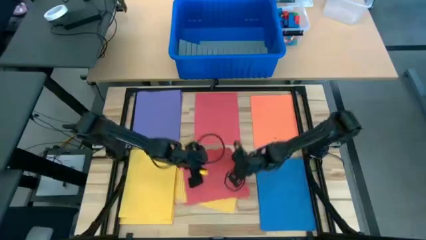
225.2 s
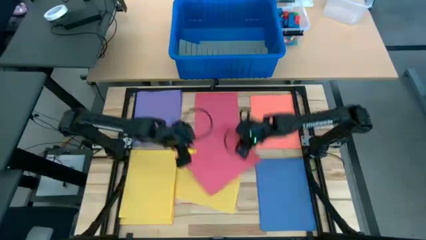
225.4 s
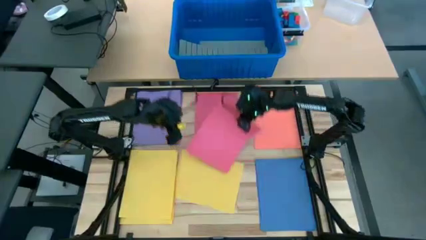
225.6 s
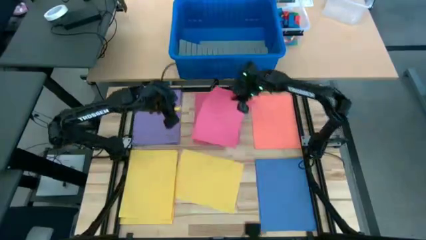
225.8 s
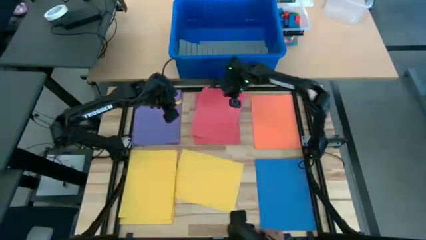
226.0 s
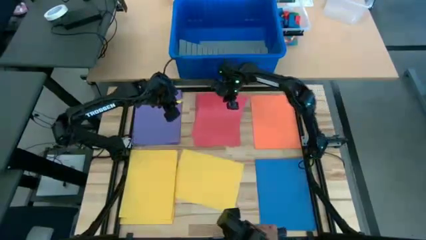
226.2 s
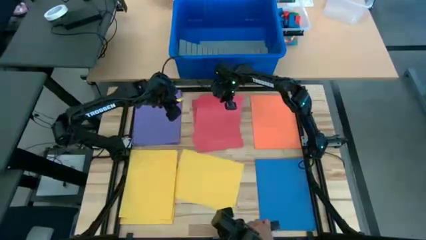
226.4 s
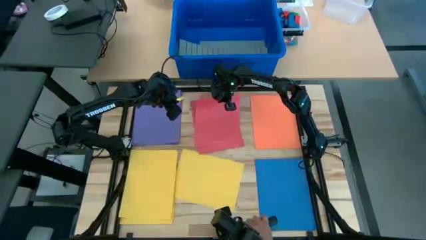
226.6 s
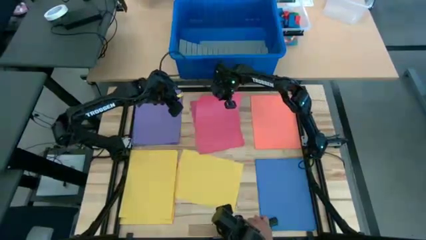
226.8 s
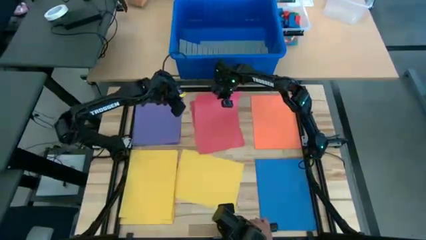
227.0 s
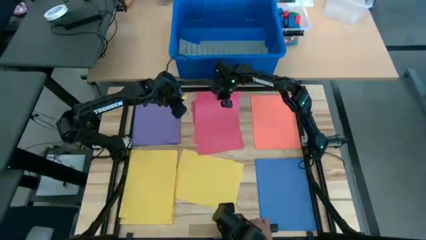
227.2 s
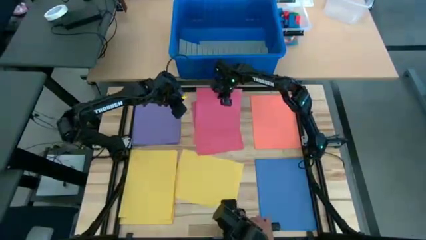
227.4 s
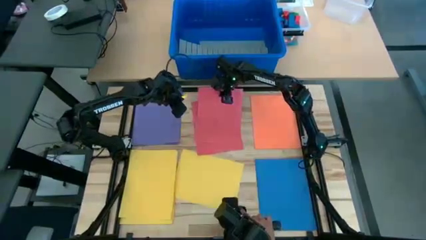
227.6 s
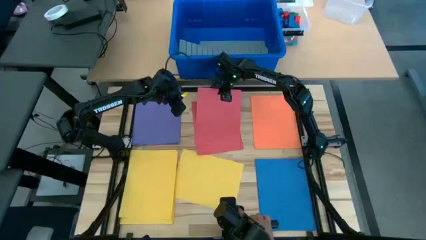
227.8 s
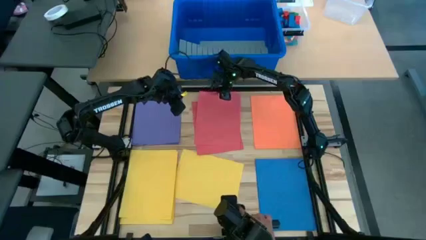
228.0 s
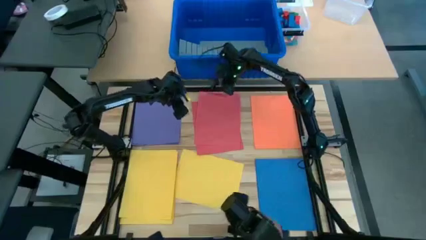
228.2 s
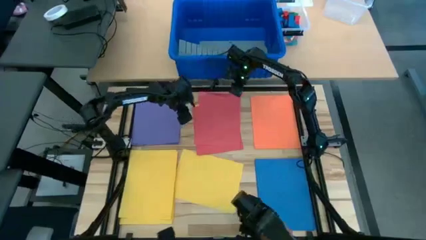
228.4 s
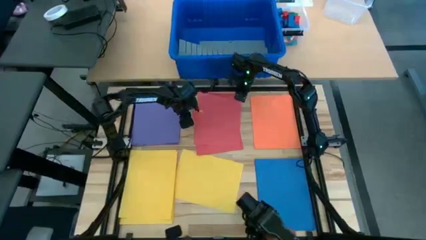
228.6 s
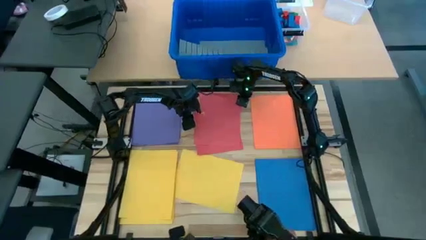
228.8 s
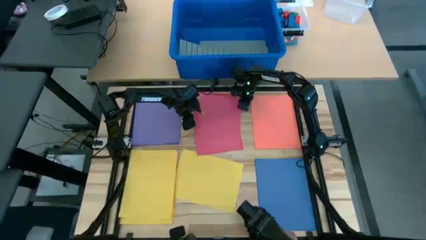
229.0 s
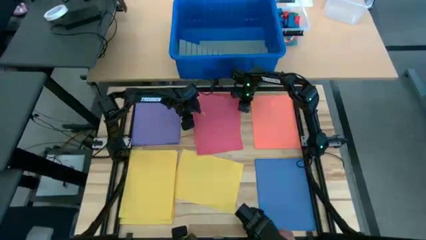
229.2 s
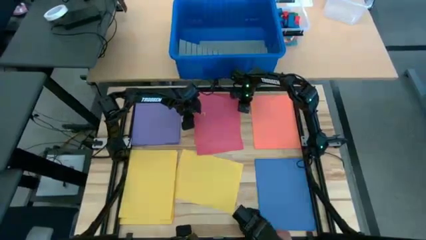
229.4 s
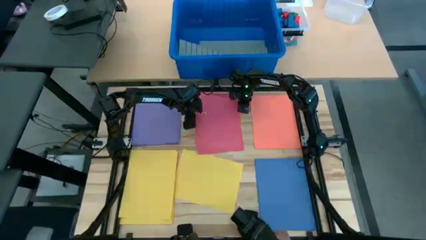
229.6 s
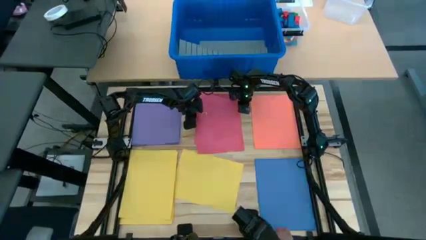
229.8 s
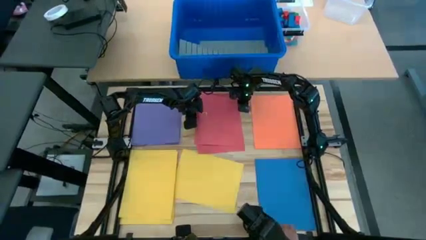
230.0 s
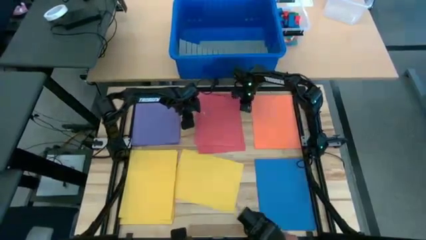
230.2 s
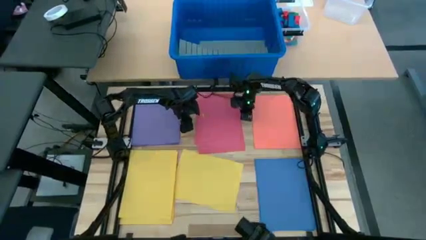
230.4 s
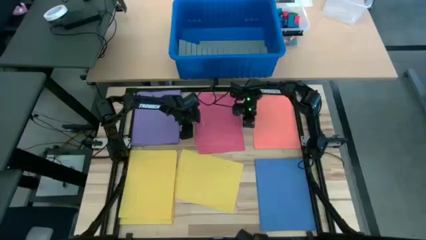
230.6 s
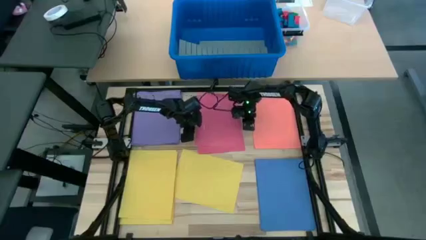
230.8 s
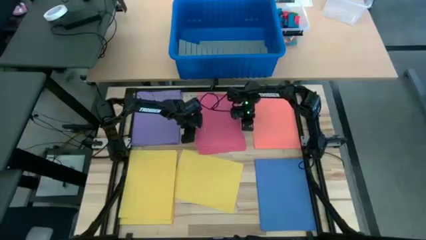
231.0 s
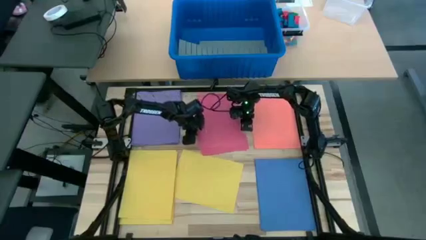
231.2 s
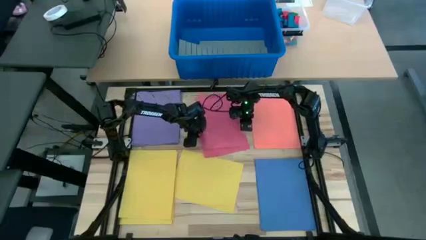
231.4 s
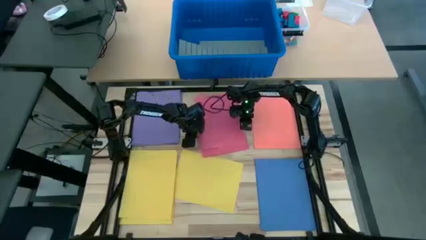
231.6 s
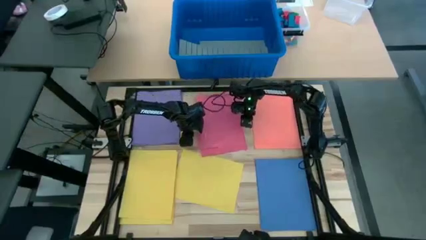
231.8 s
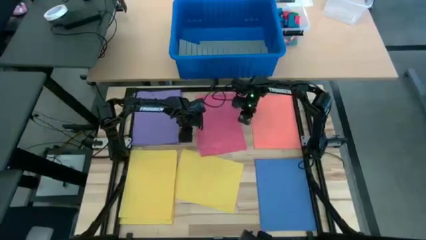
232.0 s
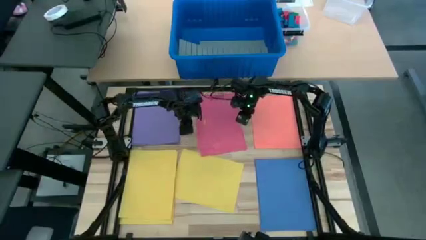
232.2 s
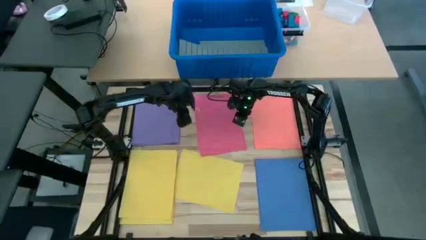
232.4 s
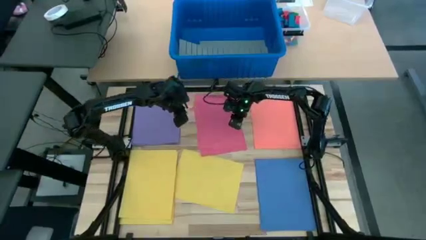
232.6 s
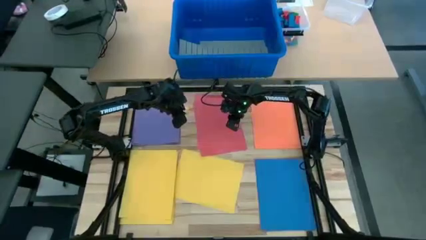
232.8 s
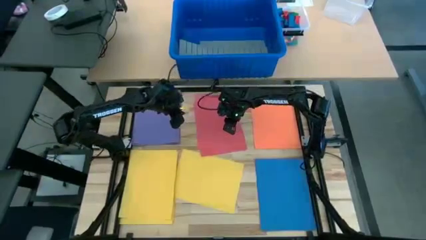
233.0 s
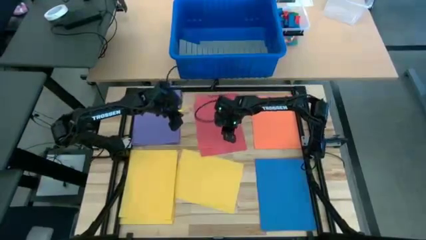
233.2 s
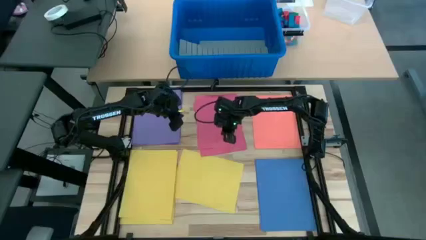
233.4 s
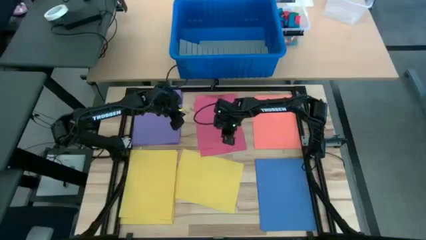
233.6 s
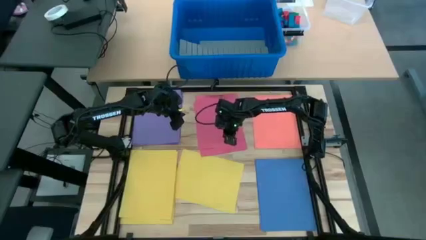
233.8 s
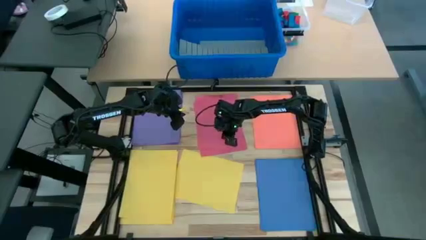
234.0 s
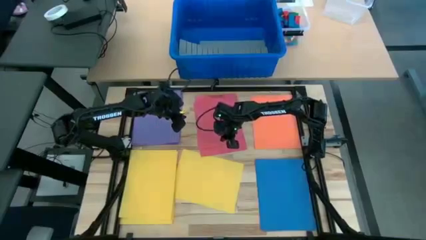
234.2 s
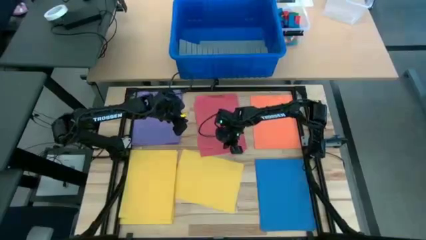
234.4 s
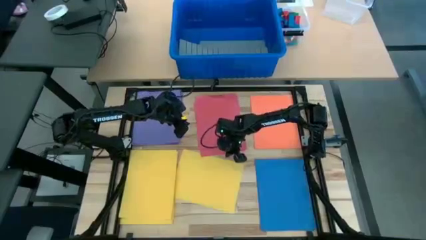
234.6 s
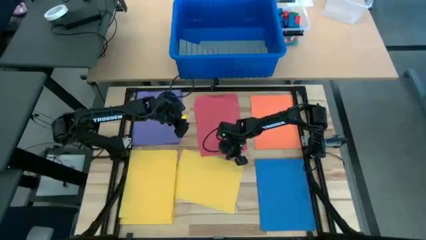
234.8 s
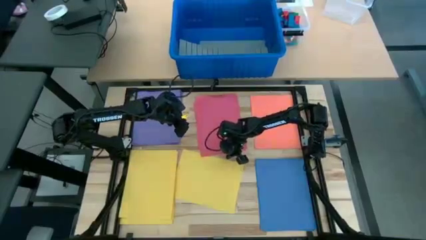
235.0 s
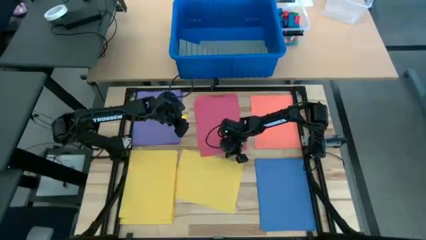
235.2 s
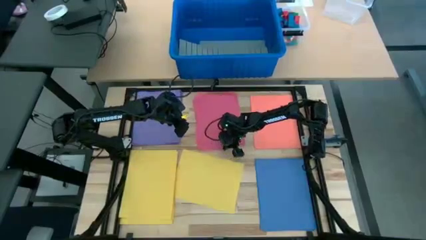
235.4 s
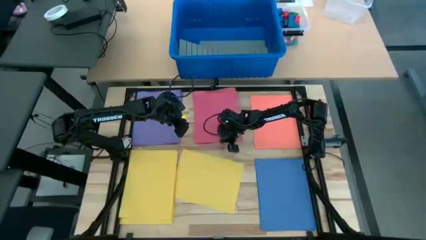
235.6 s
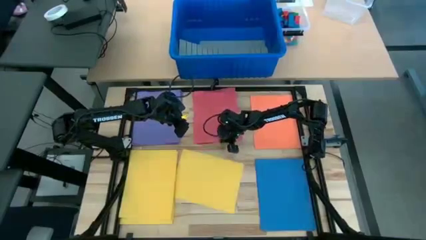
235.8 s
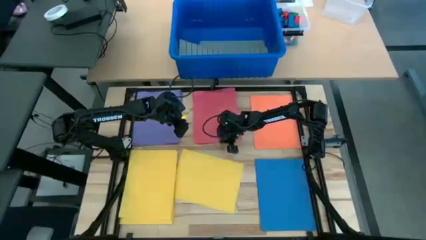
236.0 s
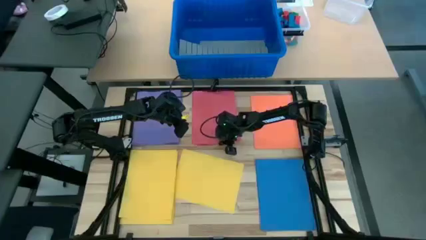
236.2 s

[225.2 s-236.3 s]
Task: Organize paper
Stack the pink colored paper on top of the other pink colored paper

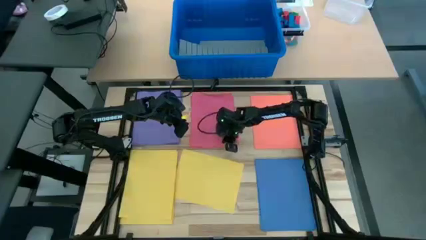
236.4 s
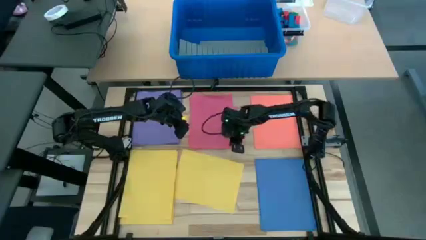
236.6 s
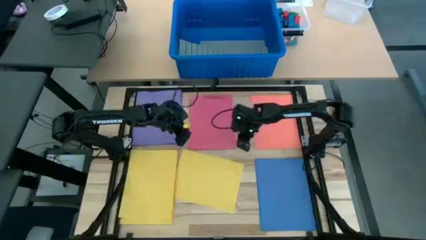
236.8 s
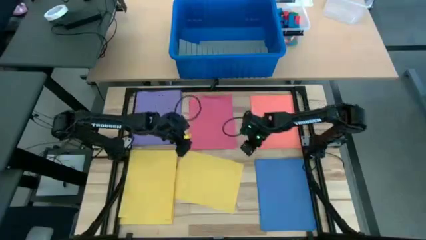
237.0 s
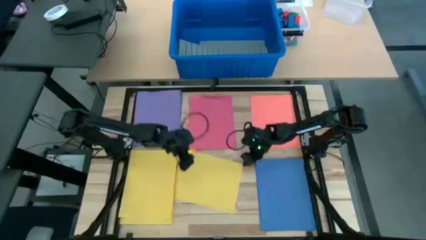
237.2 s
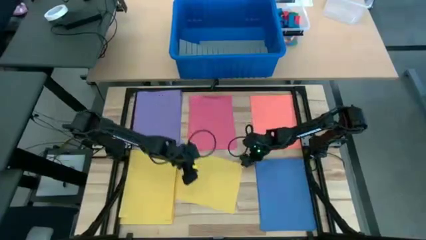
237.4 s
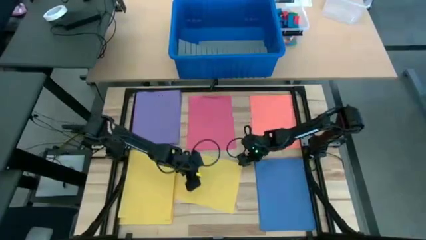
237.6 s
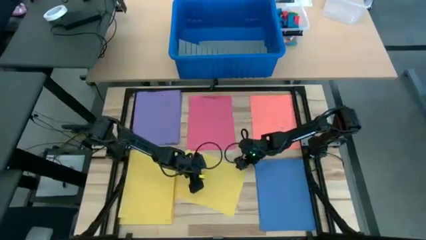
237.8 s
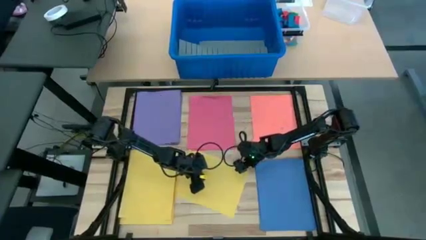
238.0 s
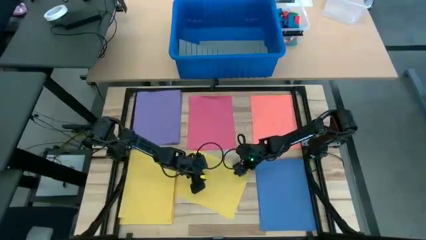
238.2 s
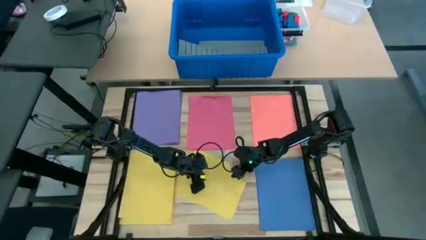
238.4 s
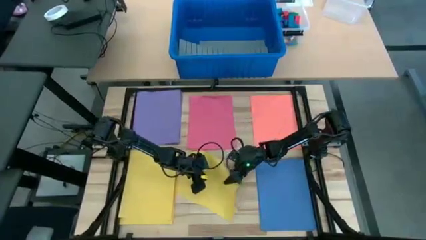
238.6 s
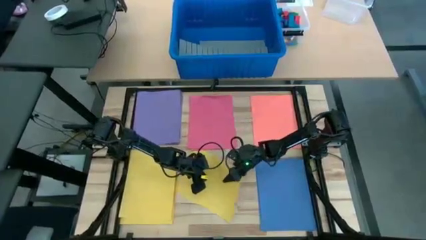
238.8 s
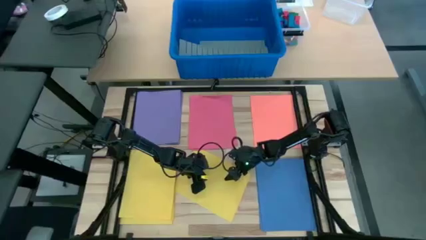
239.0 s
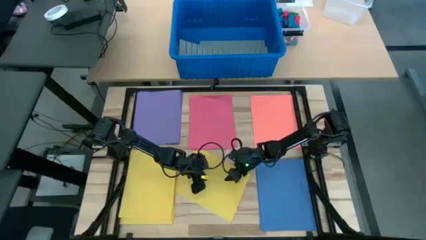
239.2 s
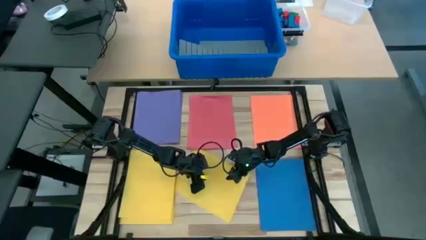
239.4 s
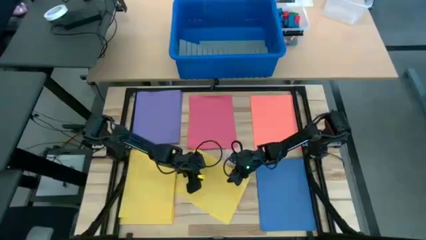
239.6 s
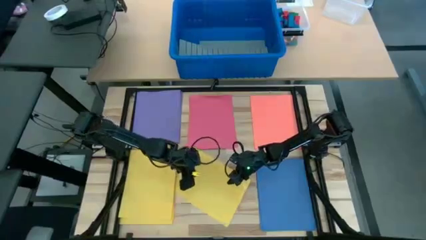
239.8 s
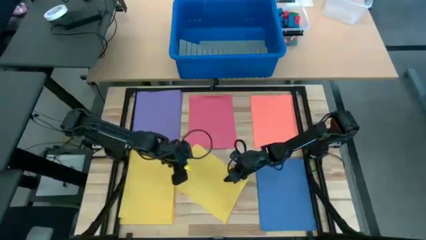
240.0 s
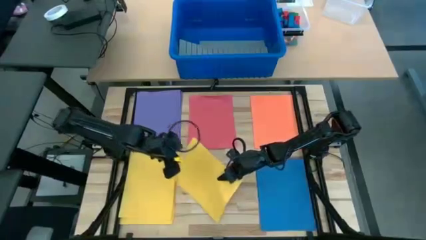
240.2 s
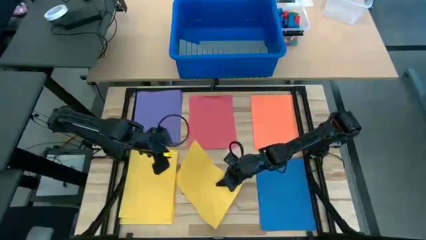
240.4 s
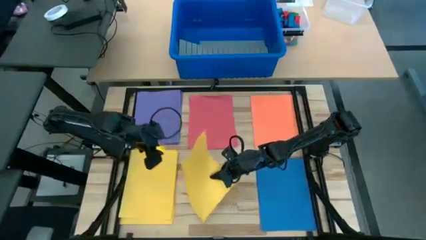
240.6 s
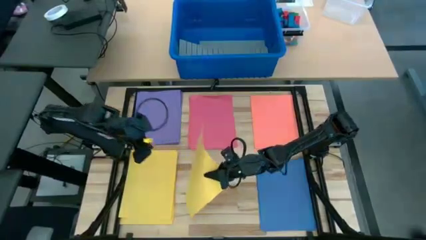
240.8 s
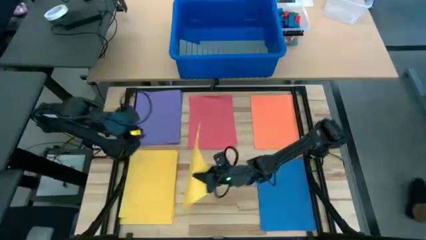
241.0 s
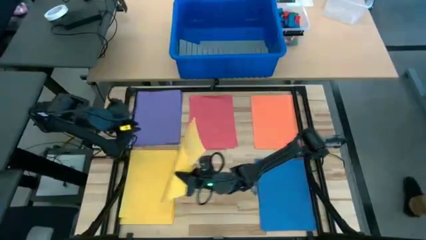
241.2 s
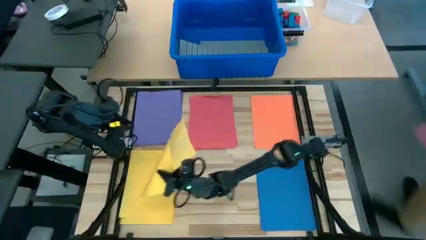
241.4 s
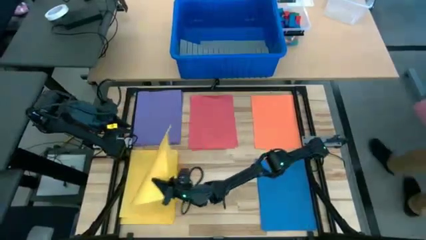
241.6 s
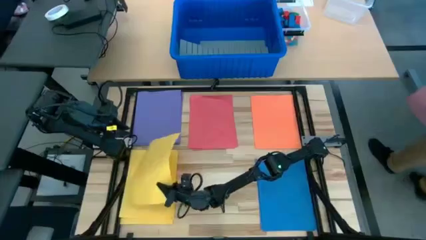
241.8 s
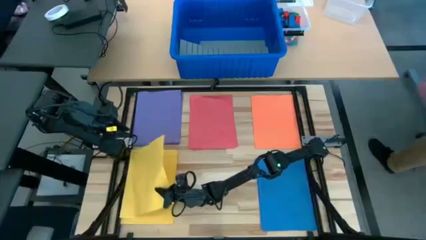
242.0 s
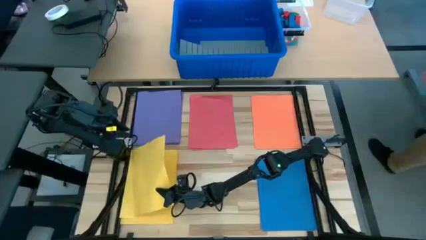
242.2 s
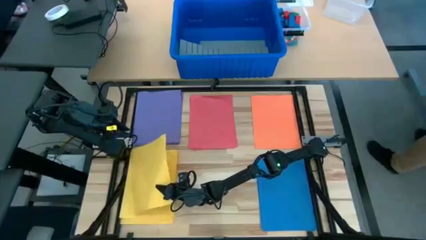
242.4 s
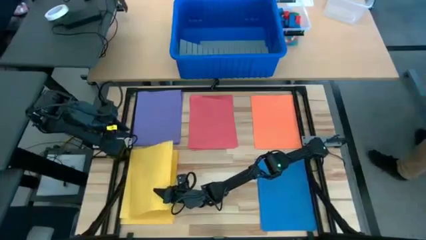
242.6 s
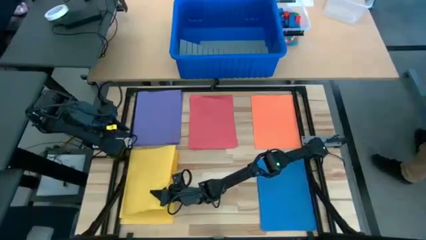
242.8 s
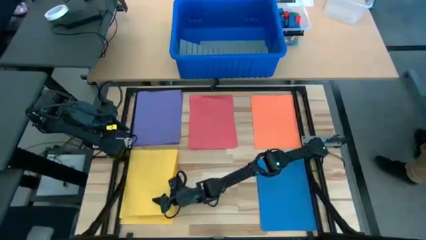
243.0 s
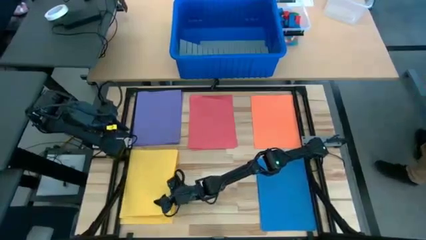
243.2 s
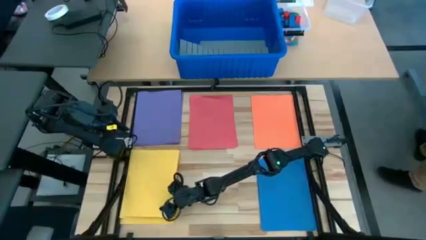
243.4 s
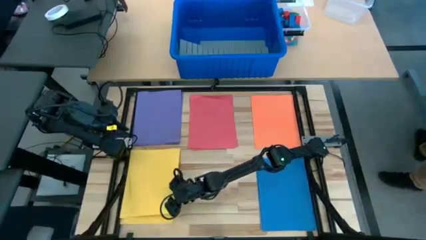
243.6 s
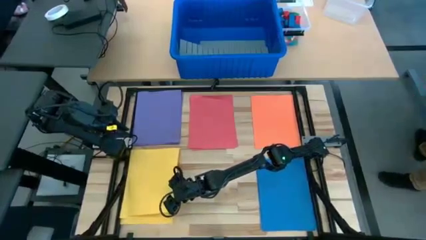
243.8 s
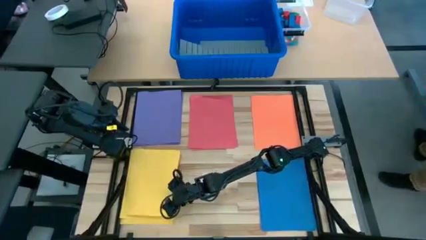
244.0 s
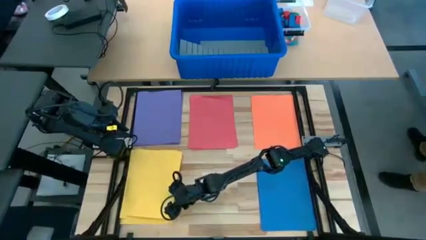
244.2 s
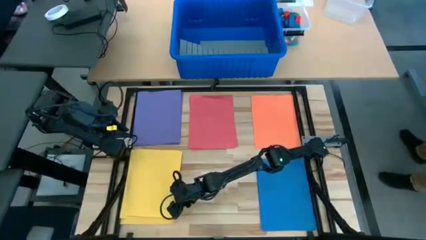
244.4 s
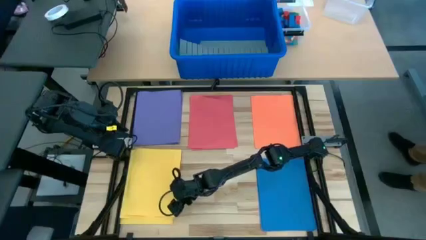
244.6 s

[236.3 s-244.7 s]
Stack the yellow colored paper on top of the other yellow colored papers
